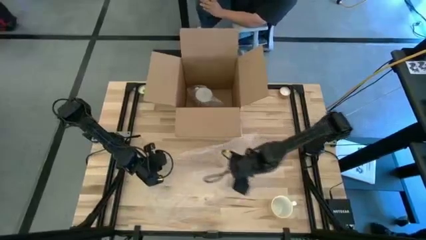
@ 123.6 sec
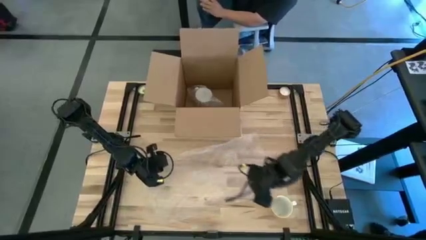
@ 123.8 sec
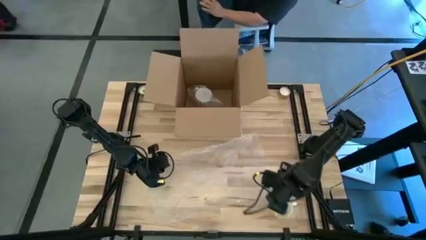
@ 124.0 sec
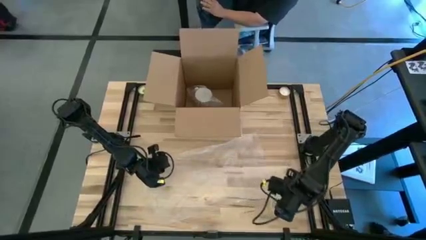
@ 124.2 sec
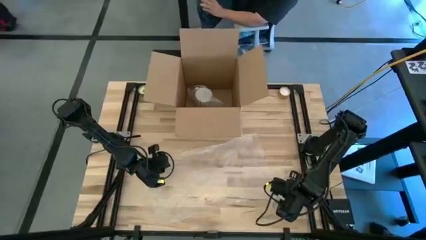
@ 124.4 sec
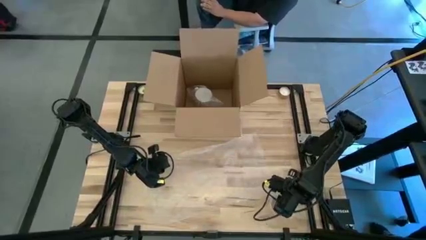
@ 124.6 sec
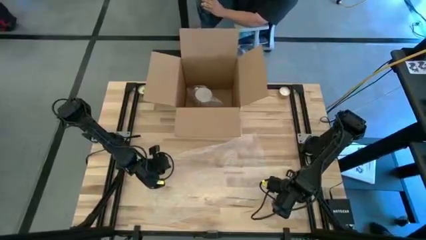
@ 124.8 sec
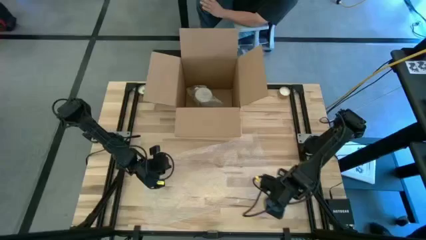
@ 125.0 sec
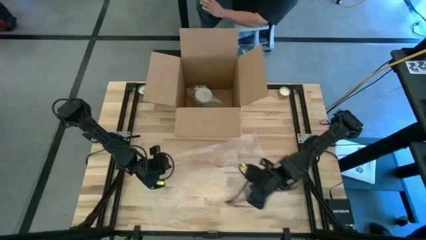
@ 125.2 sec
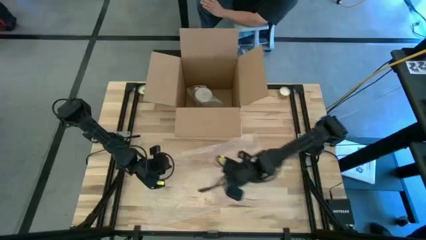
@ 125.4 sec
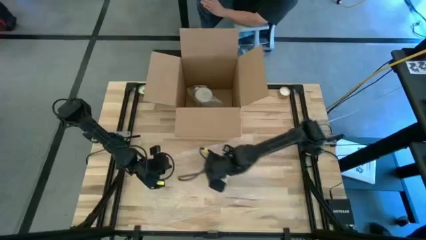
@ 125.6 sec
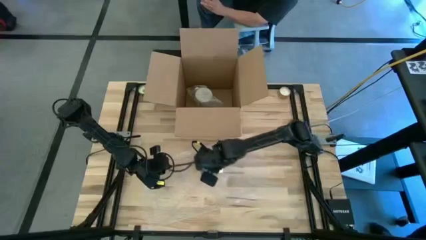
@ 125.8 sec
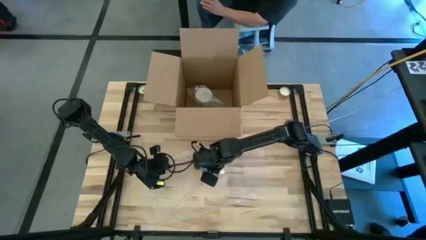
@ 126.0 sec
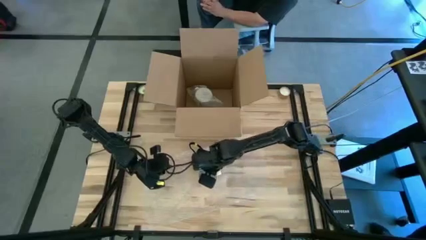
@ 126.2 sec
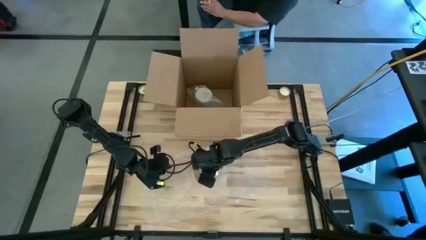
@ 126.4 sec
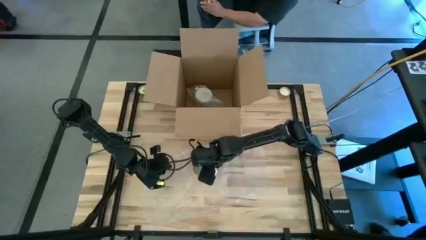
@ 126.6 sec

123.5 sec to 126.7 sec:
Task: wrap mug
Put the yellow mug on the bubble wrap

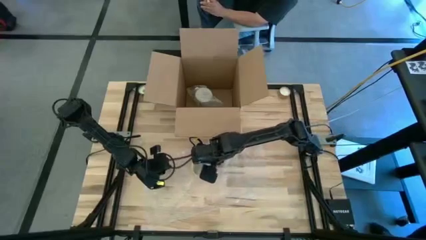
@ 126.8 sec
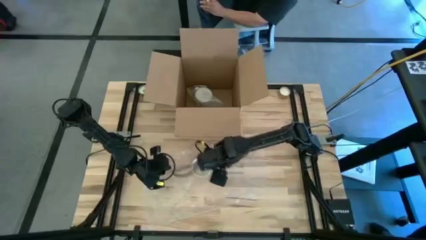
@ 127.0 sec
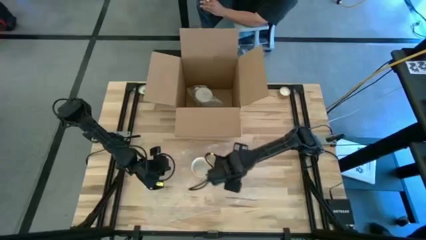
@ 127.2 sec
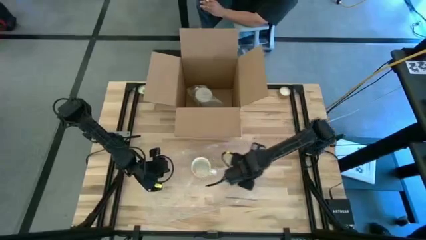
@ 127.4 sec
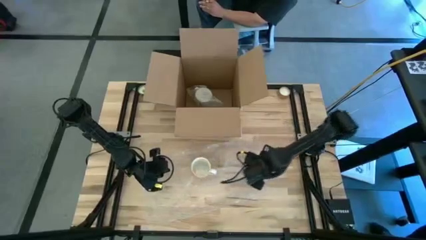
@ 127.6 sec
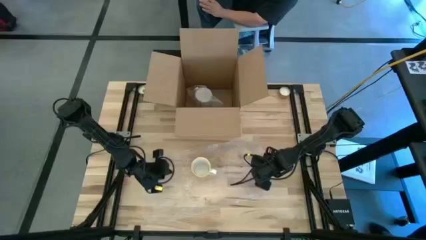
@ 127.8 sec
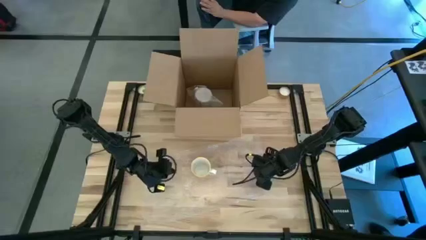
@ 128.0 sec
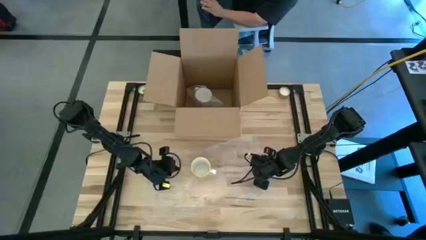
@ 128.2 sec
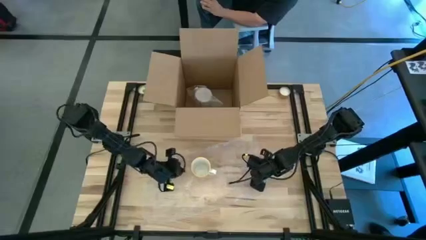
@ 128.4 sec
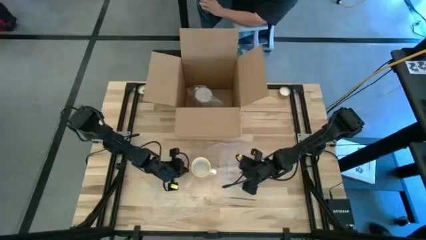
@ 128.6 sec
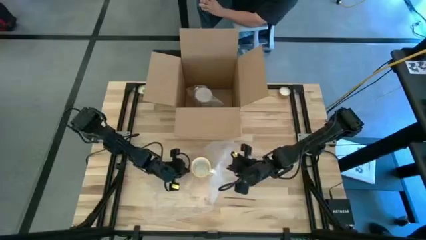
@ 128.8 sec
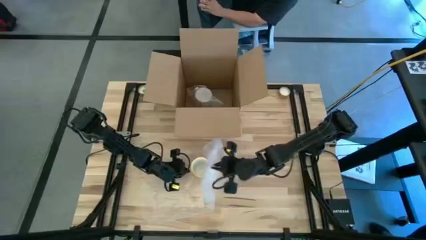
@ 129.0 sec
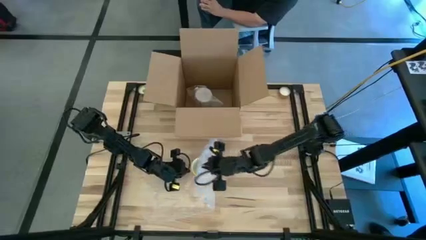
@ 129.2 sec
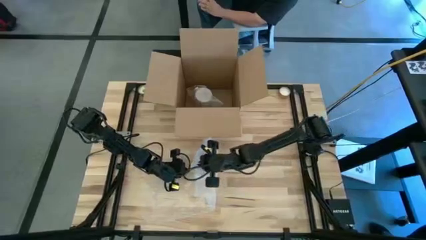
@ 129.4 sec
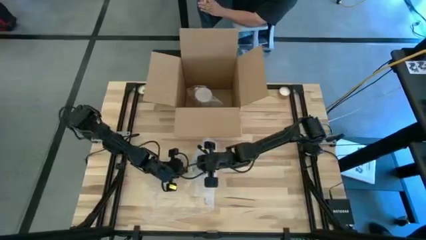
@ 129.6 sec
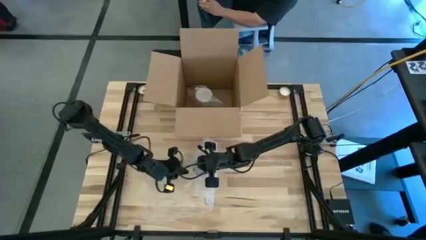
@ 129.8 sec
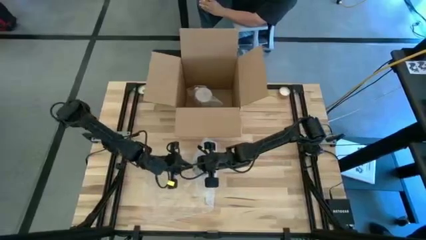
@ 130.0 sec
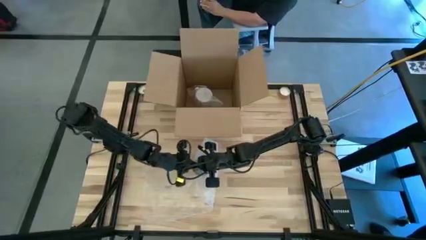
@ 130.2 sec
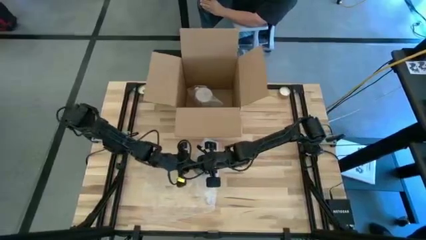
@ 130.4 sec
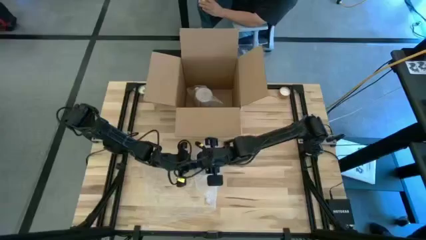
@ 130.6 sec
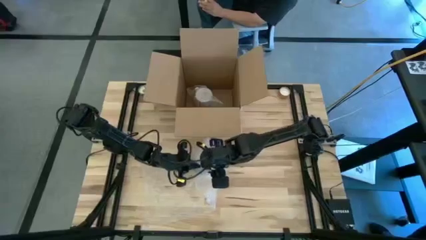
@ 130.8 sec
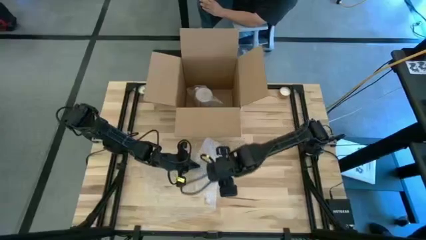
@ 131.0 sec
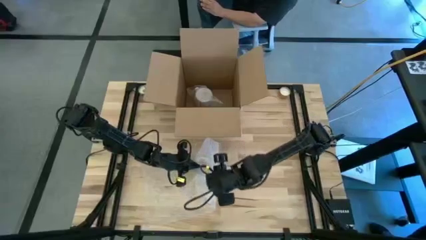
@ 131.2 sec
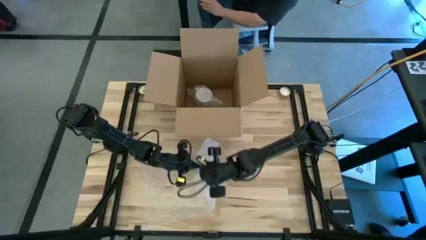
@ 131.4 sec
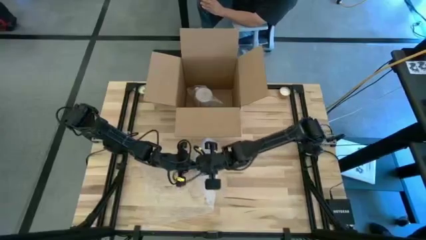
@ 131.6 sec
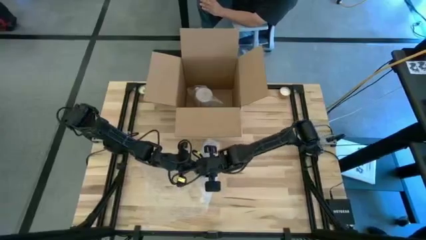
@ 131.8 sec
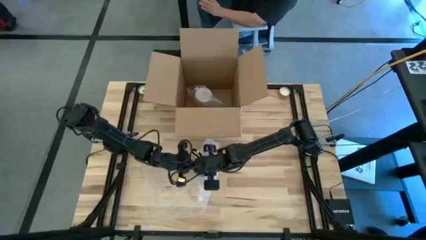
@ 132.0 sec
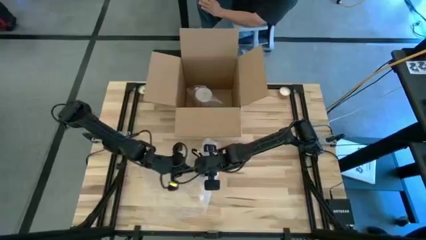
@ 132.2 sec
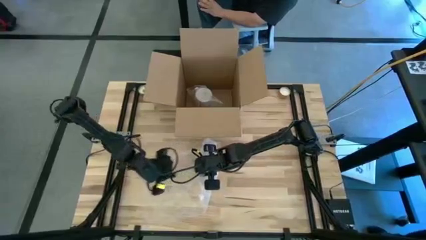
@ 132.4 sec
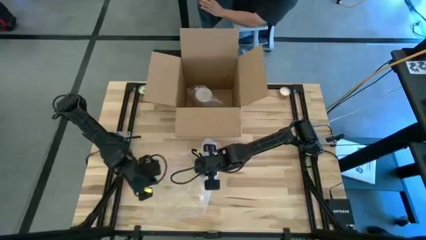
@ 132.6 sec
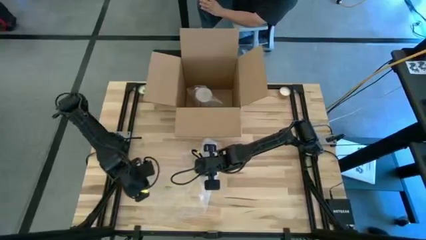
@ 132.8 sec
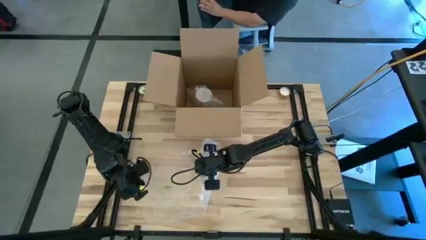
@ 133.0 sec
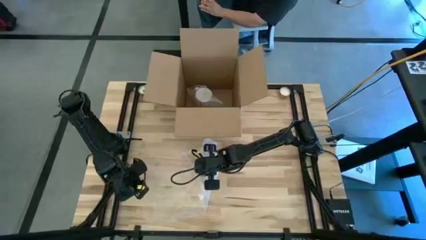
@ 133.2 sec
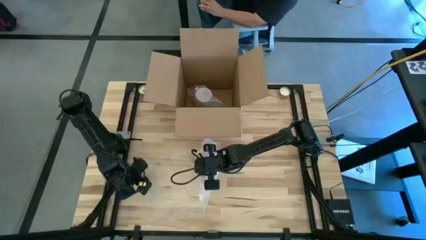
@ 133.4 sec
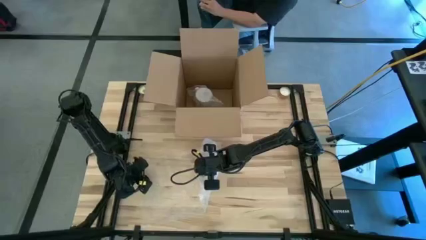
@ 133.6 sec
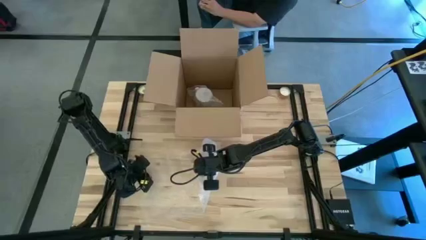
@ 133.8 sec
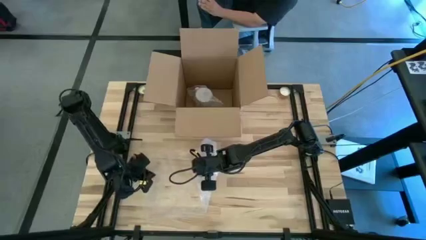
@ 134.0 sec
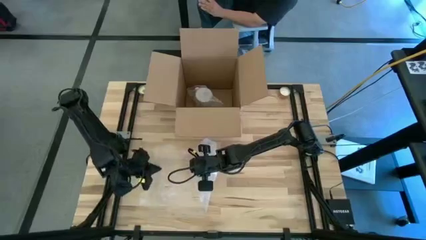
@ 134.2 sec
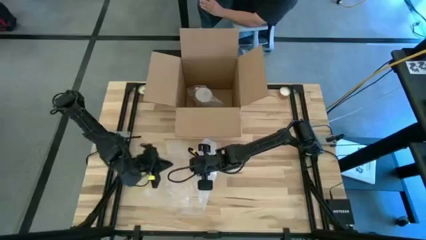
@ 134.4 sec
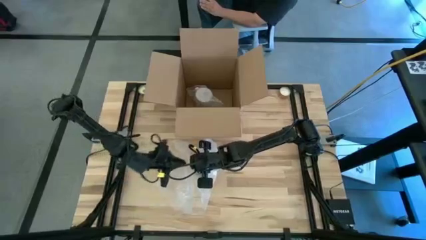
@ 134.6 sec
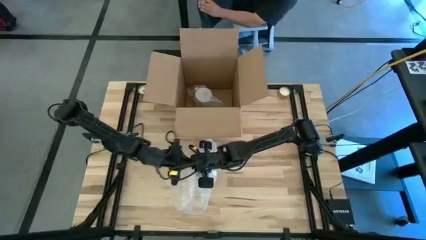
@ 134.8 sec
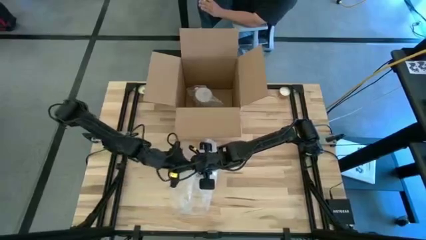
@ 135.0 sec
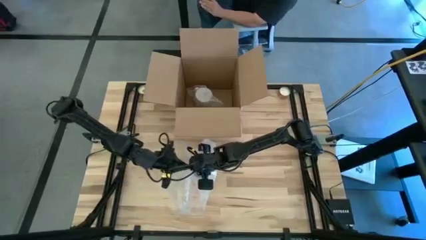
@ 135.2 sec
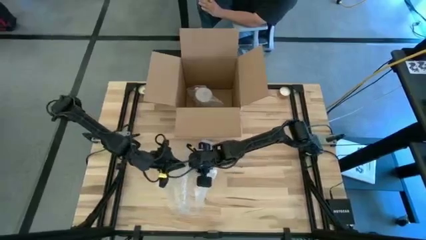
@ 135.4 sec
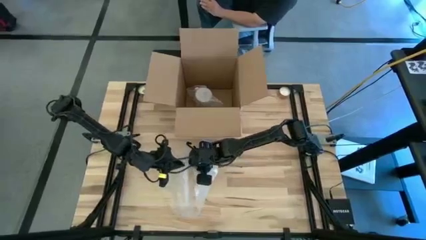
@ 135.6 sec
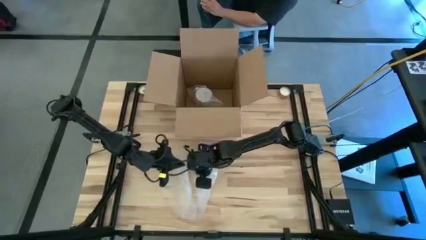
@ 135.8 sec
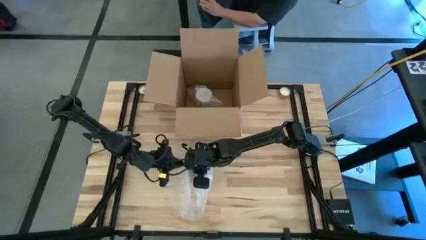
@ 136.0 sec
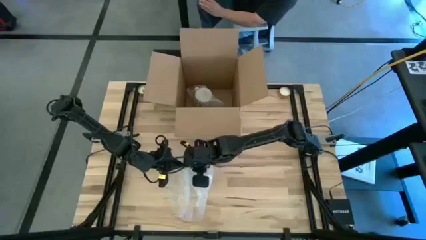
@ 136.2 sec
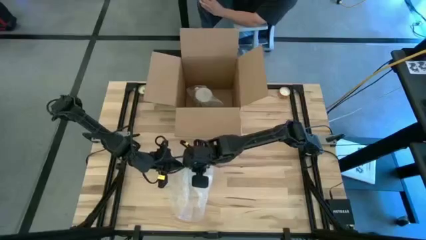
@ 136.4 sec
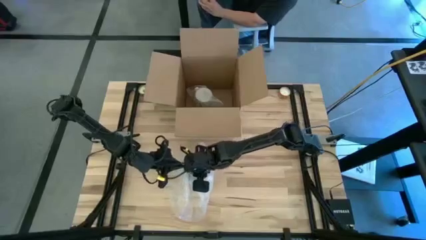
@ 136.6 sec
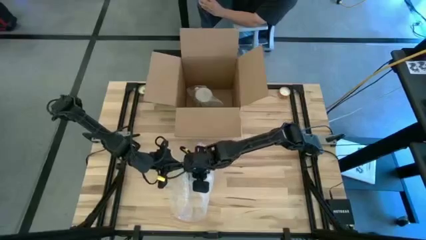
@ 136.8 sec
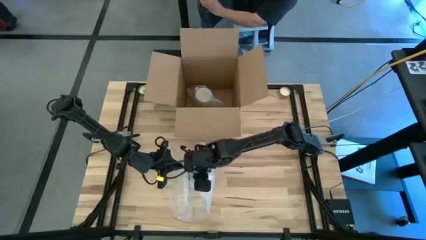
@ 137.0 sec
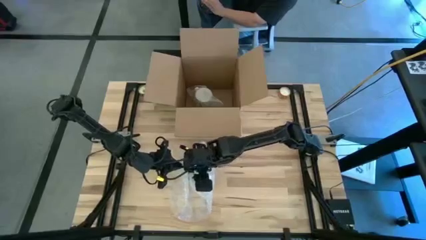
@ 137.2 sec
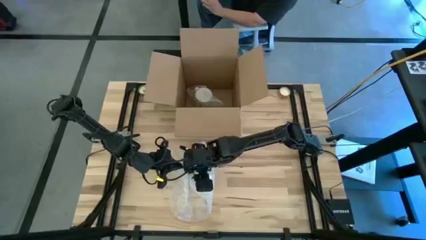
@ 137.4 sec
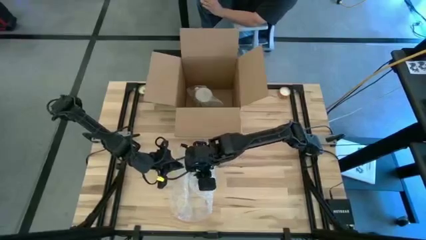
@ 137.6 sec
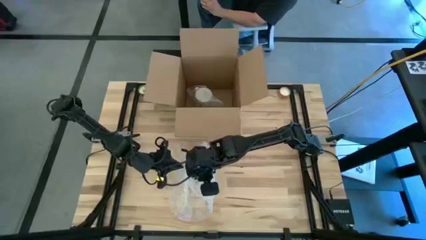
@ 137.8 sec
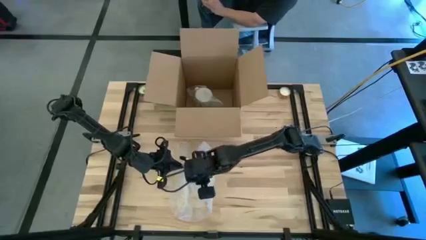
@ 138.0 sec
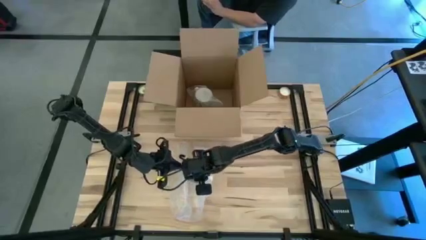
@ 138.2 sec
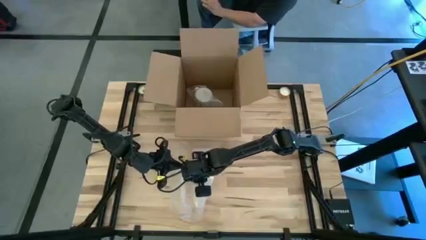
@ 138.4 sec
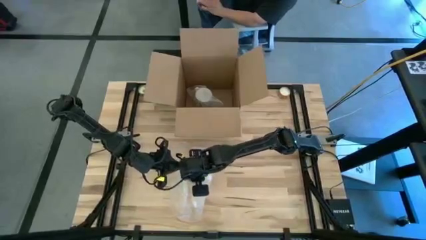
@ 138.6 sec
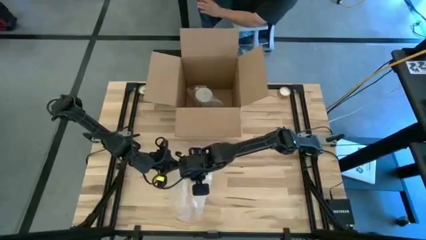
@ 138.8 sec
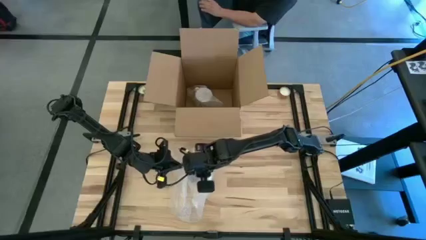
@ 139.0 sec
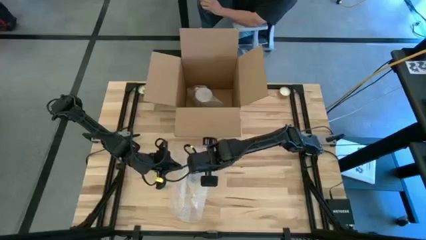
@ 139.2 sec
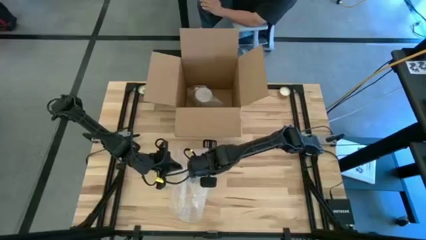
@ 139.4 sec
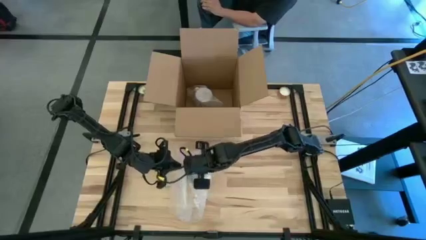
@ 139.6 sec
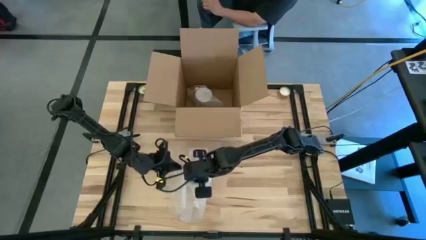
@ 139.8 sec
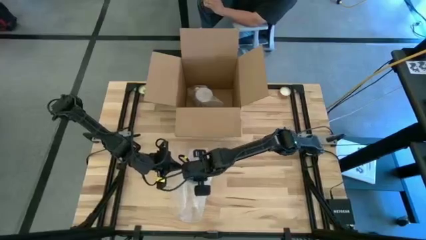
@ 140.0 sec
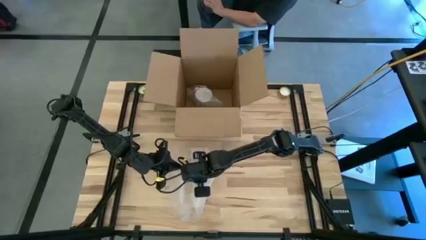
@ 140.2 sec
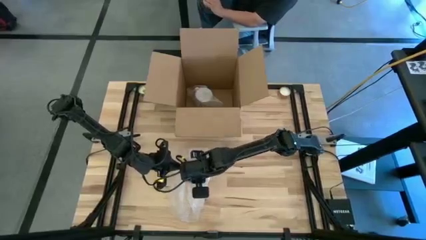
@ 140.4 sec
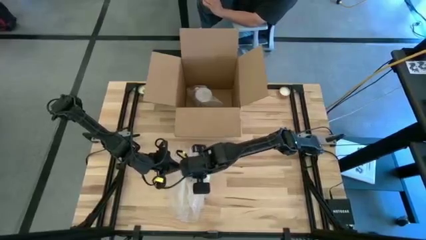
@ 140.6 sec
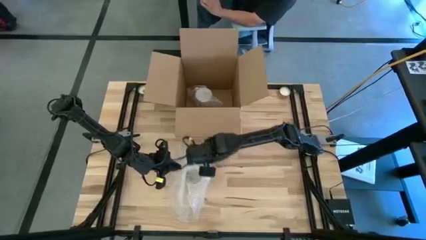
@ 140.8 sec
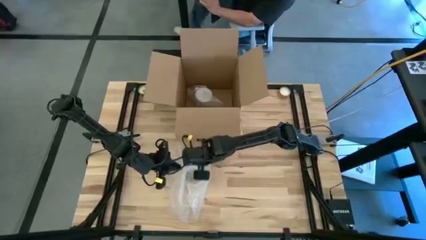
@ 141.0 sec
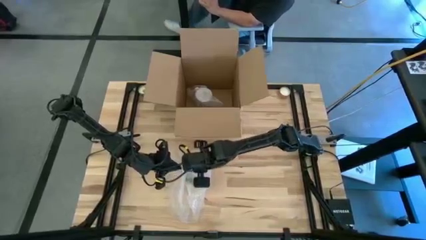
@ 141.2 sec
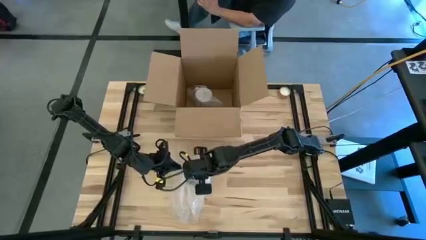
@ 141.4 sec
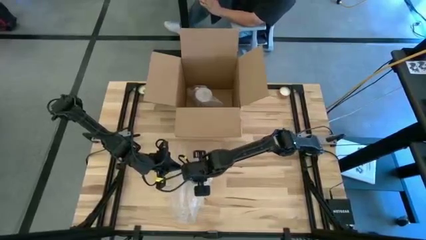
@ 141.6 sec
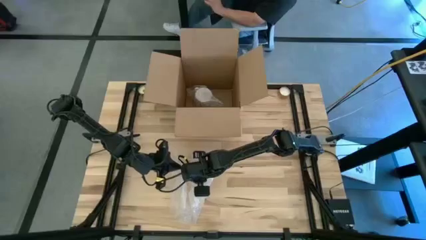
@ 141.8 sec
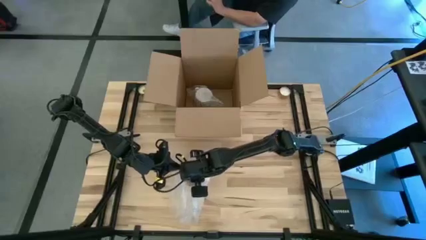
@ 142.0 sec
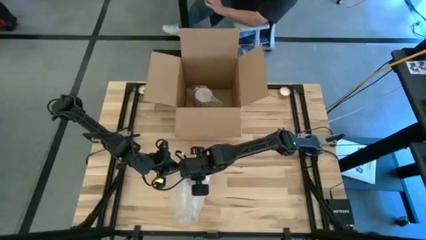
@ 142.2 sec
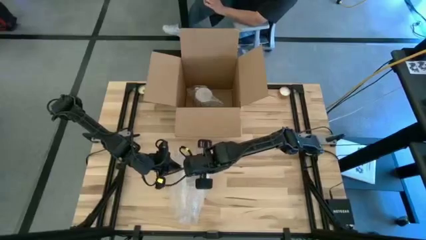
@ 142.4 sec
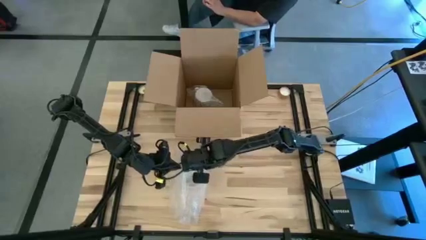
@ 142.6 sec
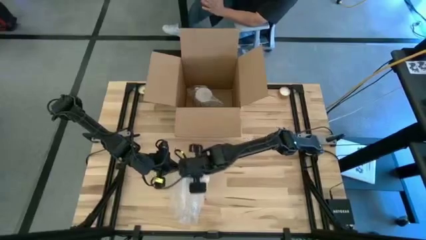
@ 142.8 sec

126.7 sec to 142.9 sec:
Wrap the yellow mug with the bubble wrap
